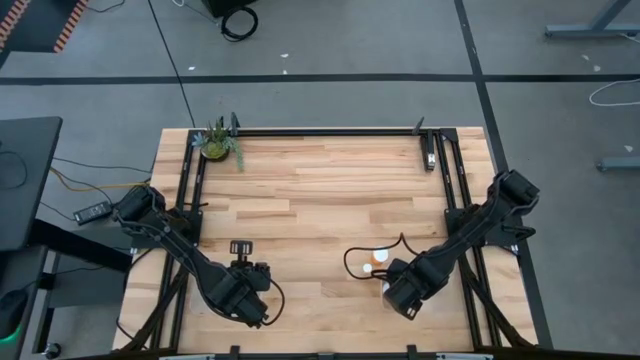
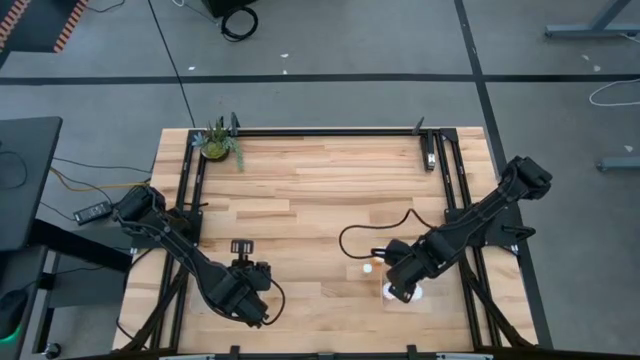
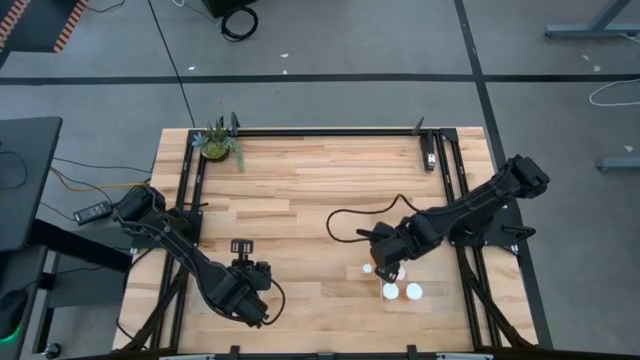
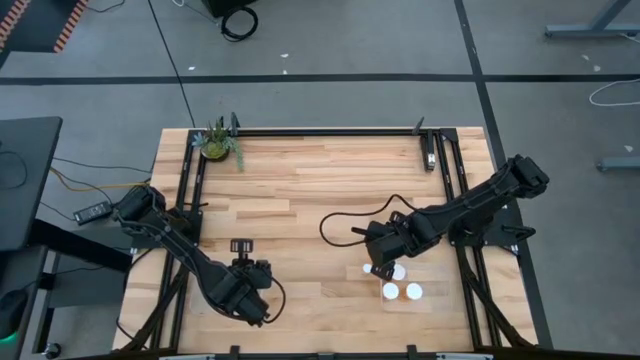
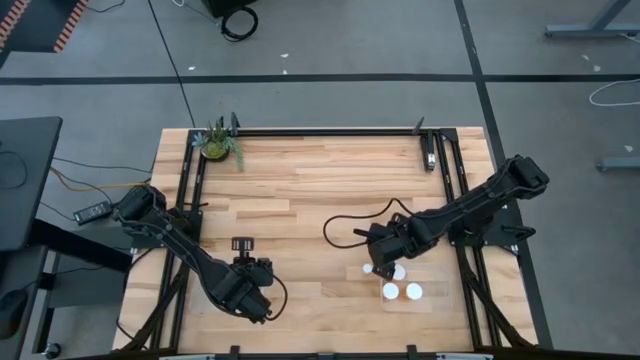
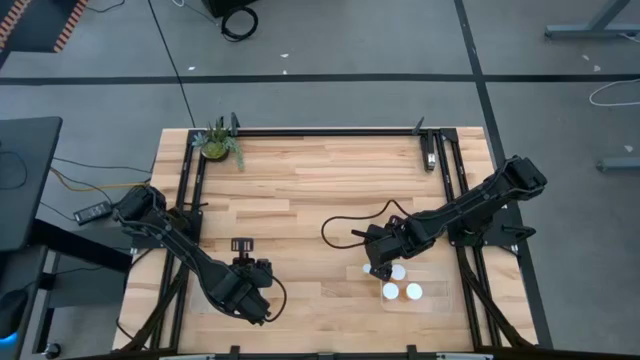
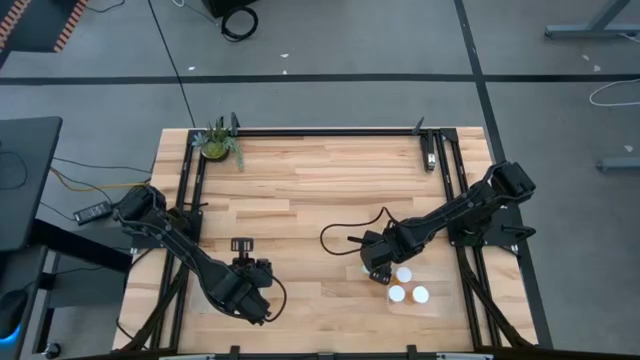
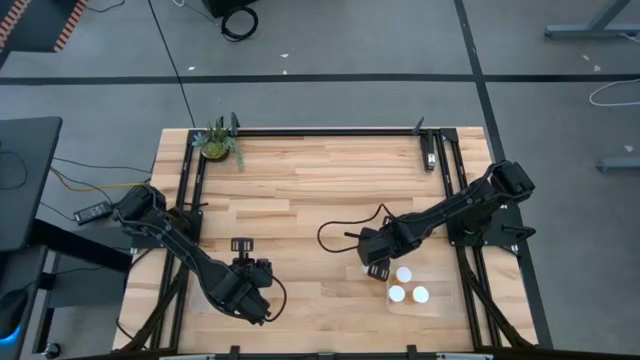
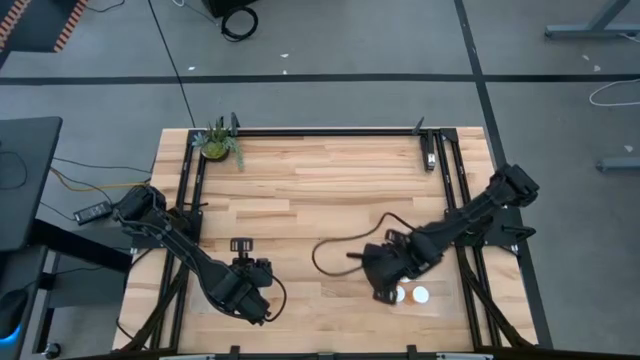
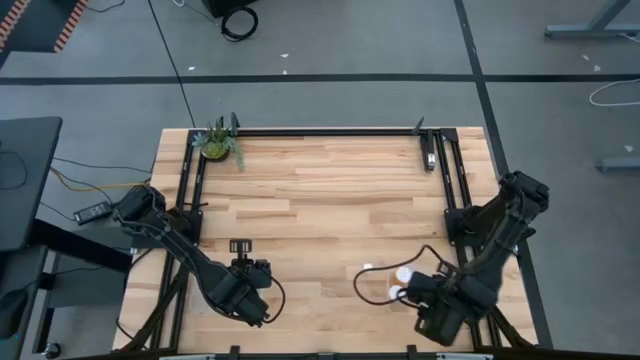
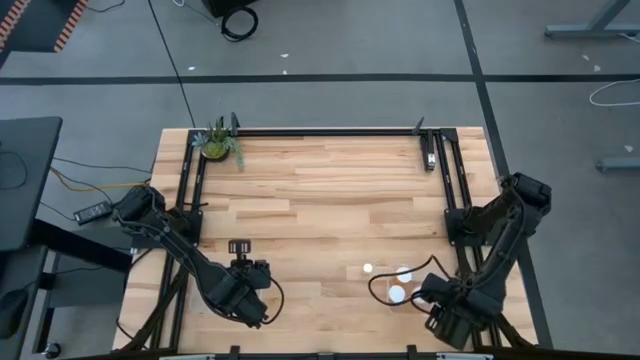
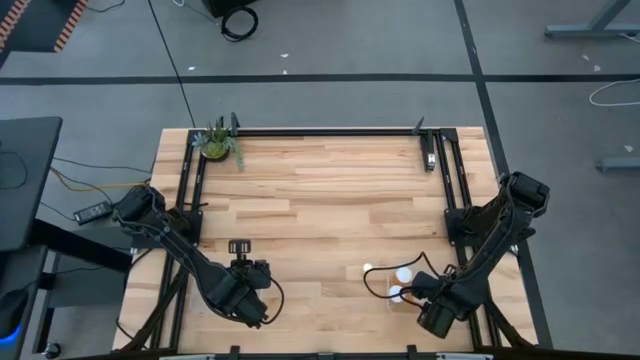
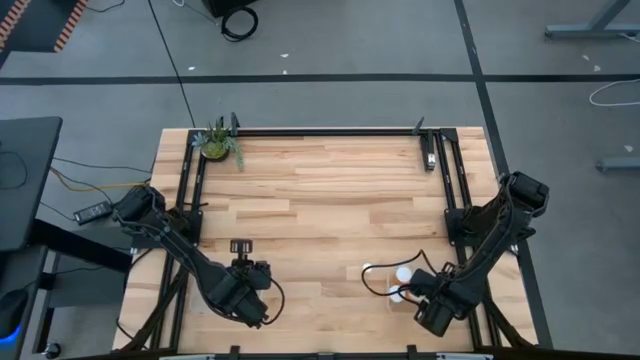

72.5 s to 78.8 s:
Task: Pick and place medicine bottles into bin by pill shape (circle, oval)
Put the large orange pill bottle into the right transparent bin

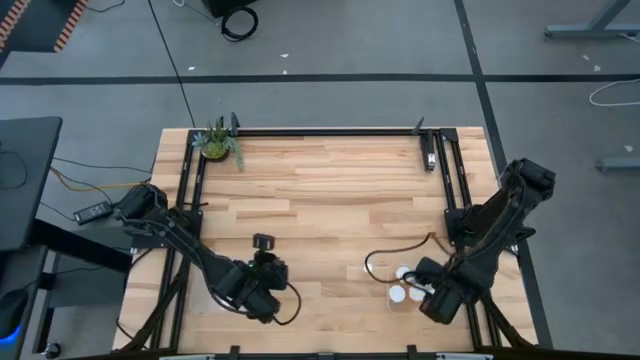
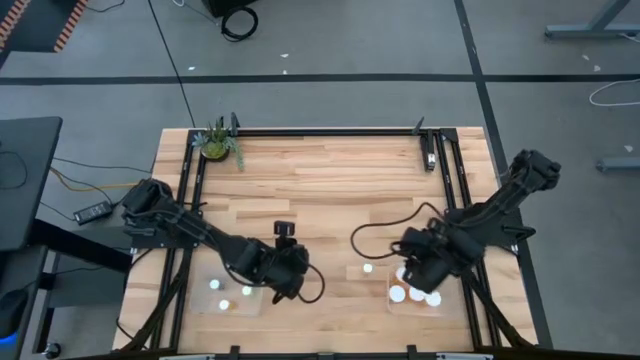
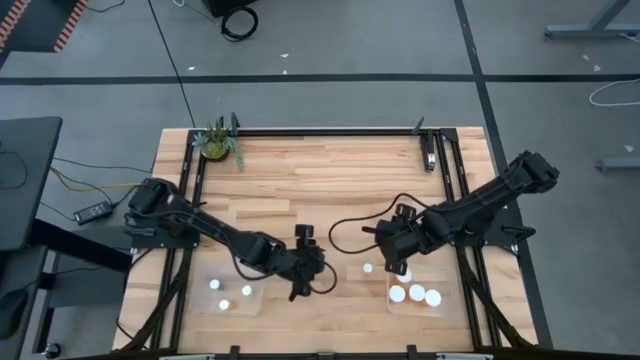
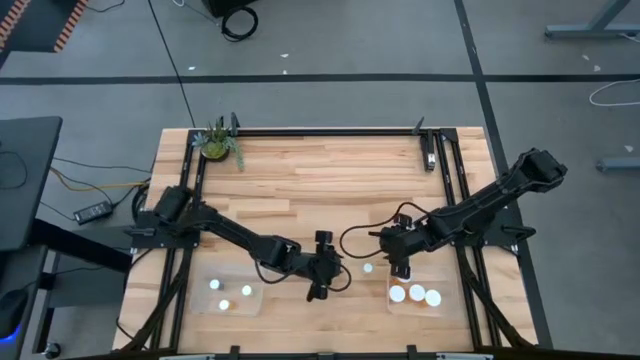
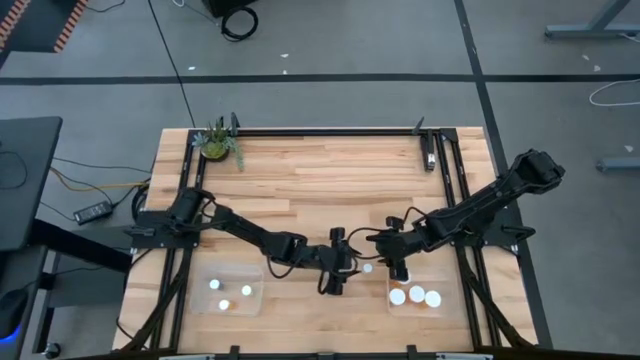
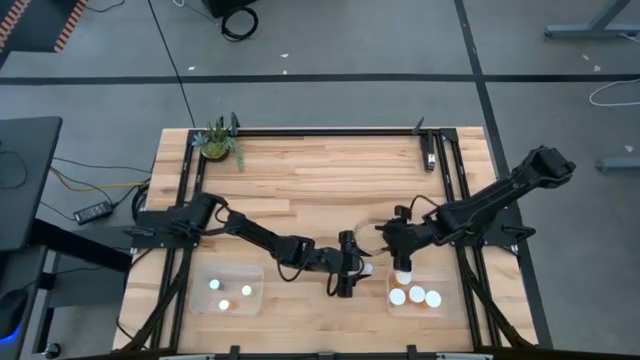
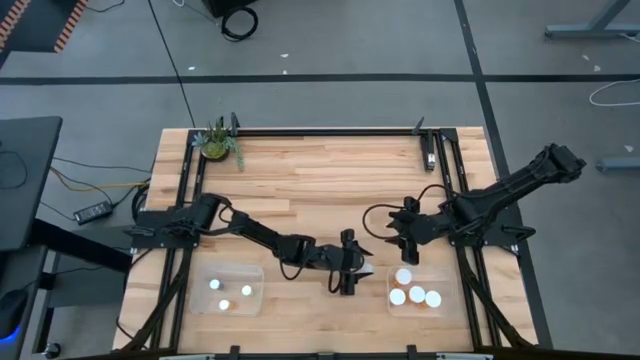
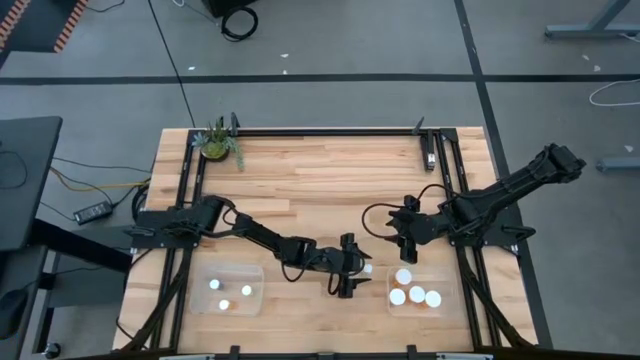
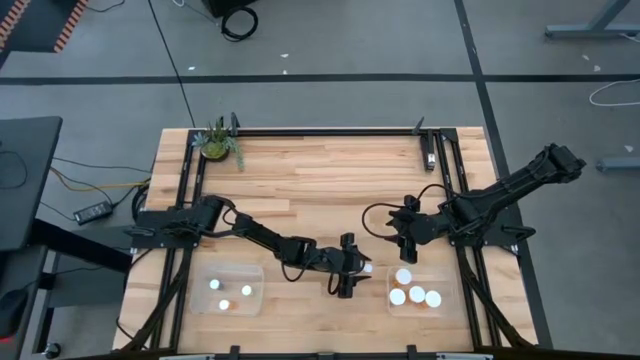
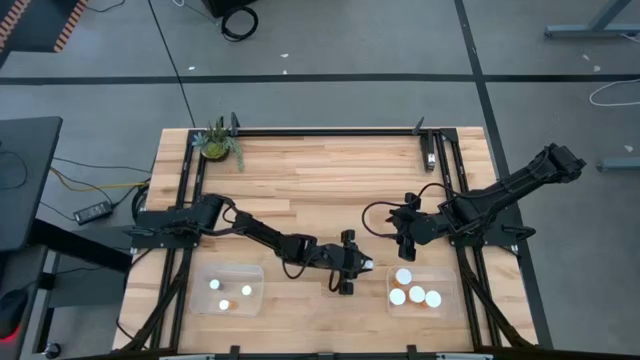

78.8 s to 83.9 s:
Put the small yellow pill bottle into the left transparent bin

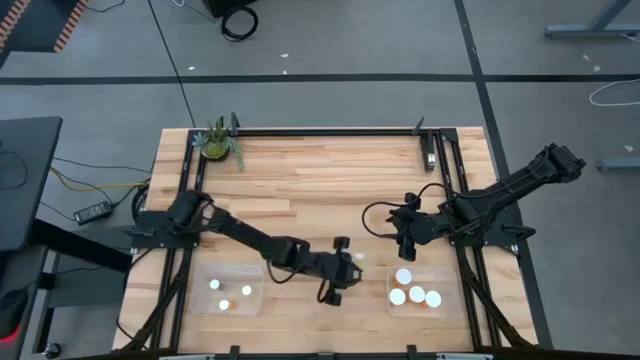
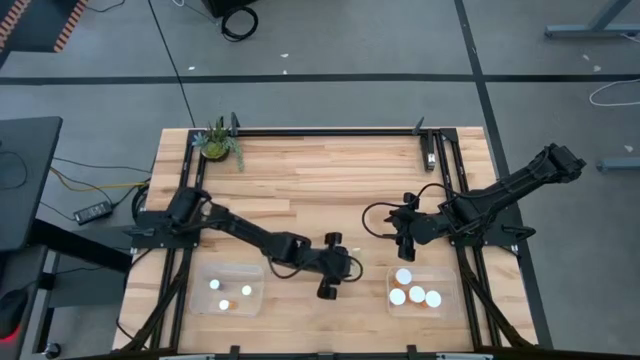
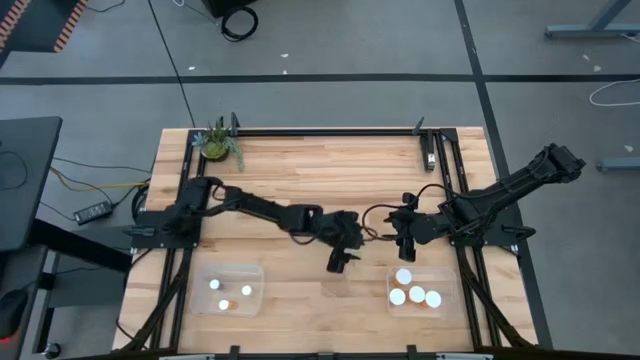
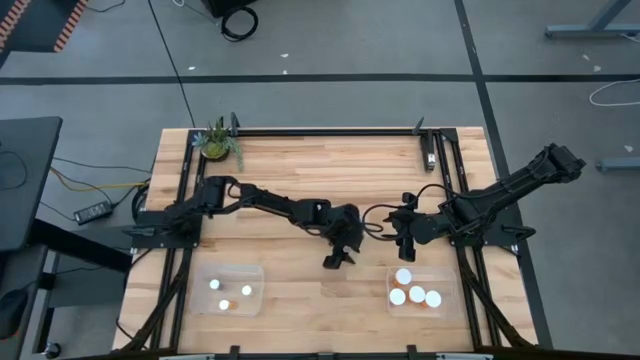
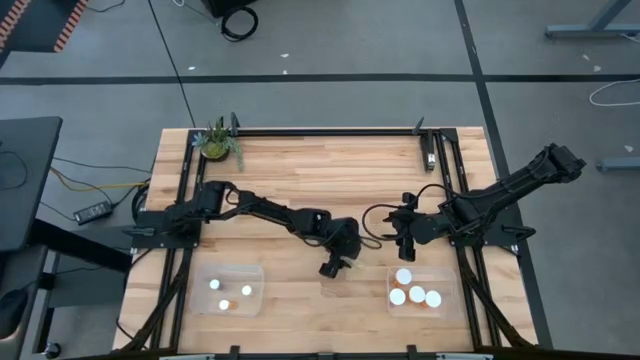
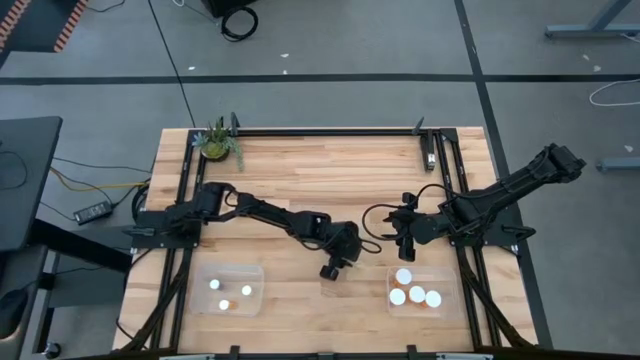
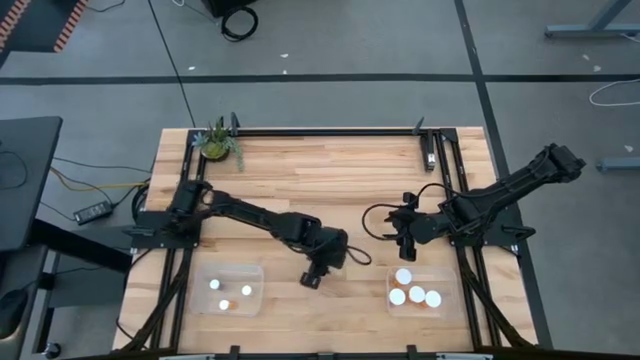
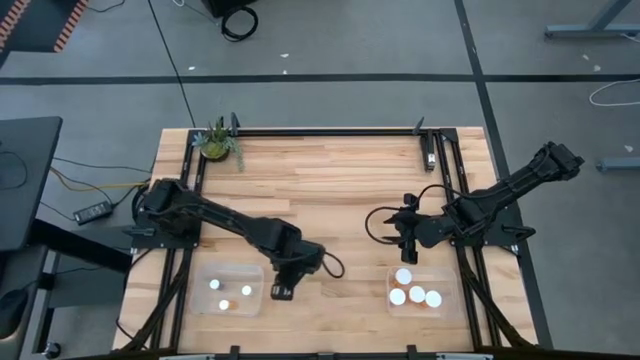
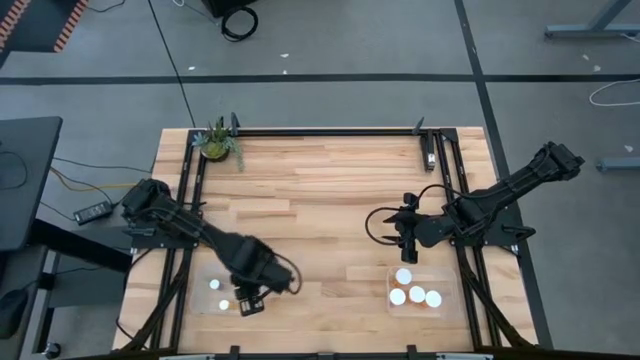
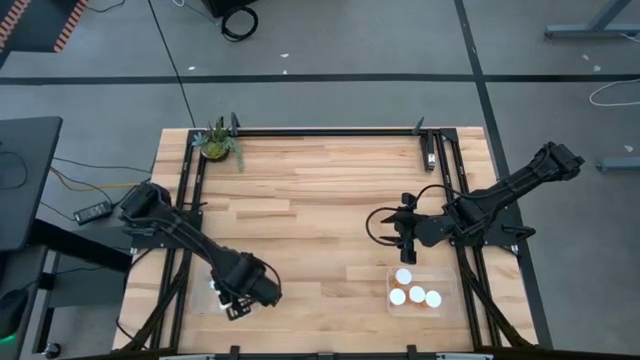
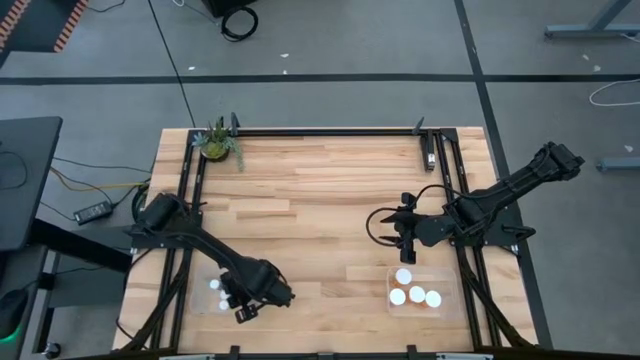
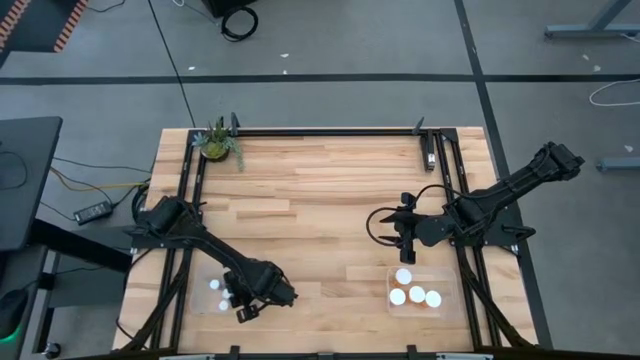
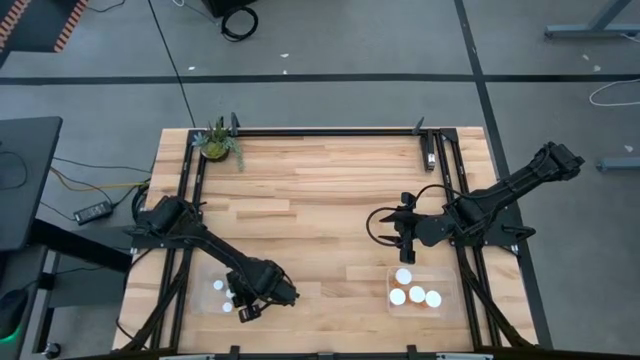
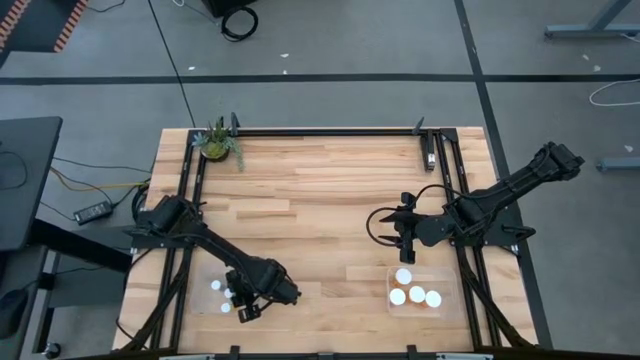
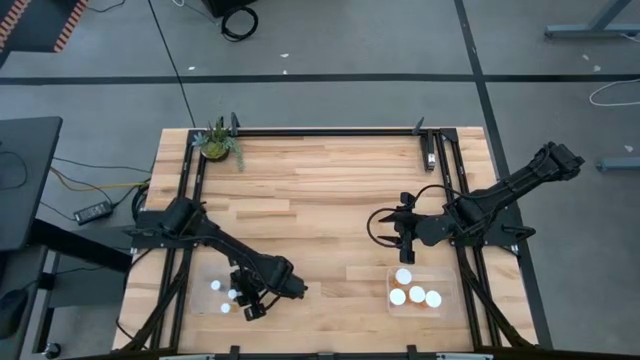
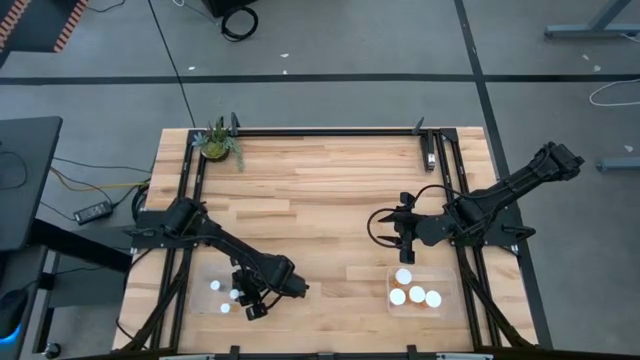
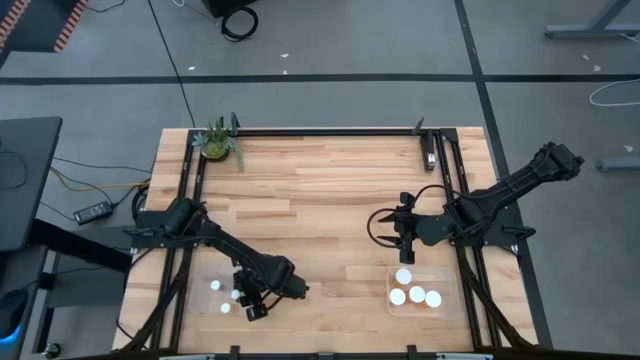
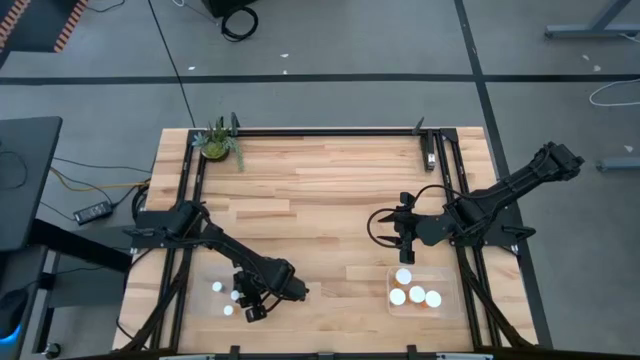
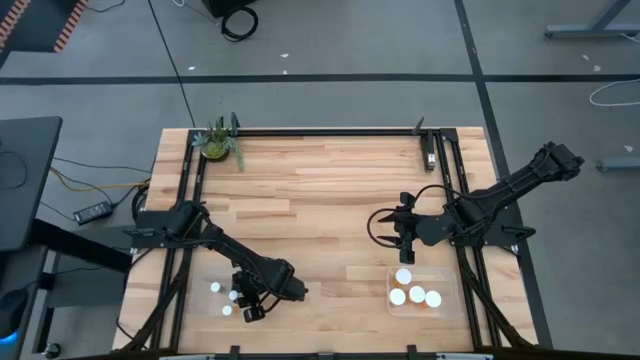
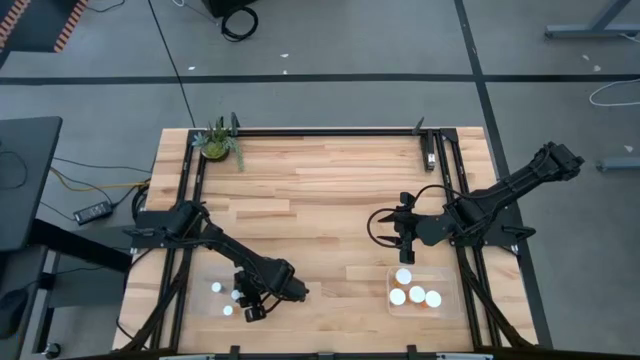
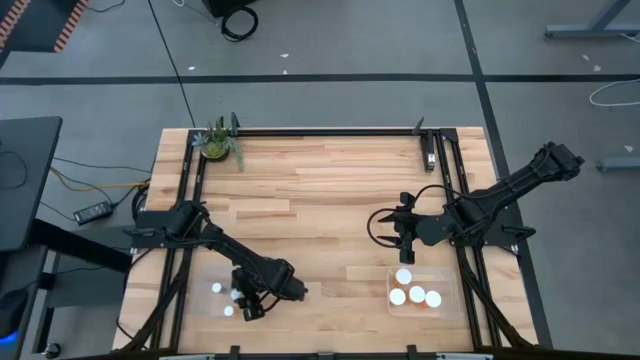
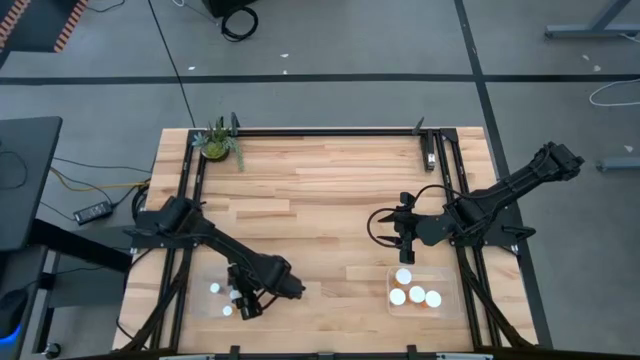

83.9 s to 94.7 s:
Put the small yellow pill bottle into the left transparent bin
